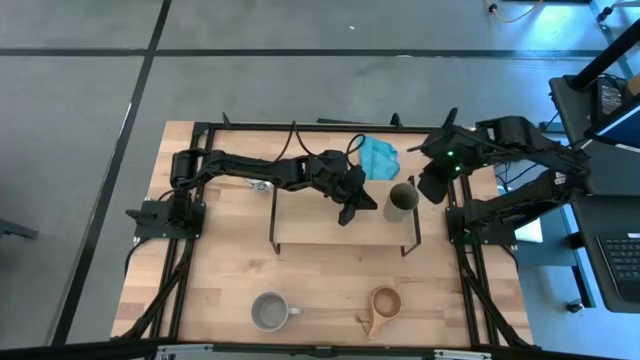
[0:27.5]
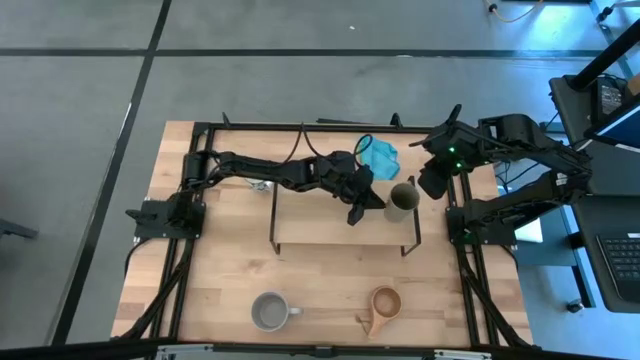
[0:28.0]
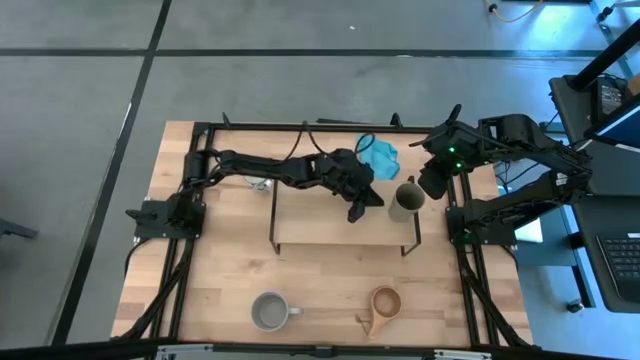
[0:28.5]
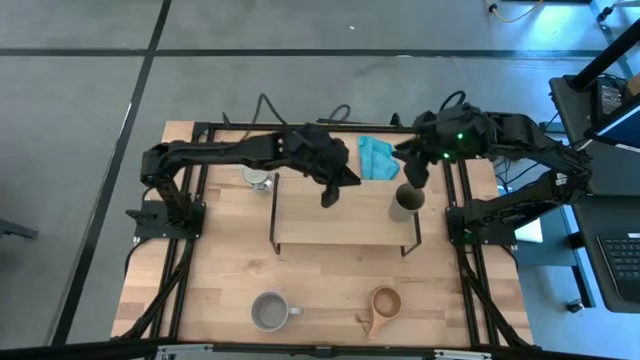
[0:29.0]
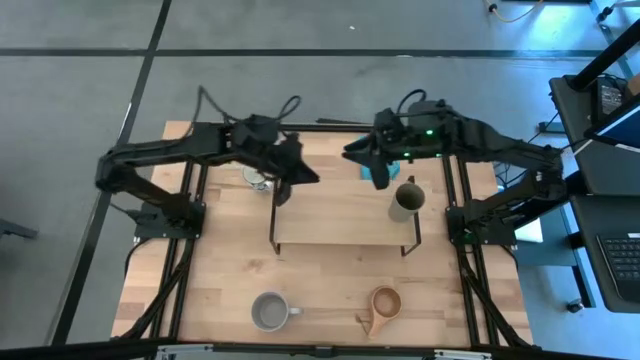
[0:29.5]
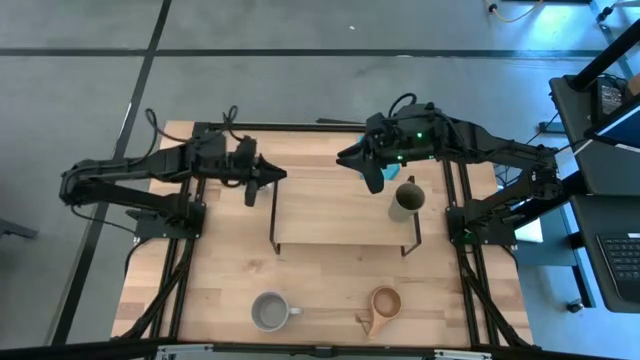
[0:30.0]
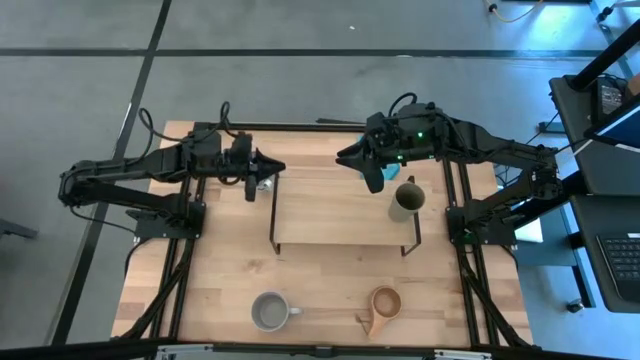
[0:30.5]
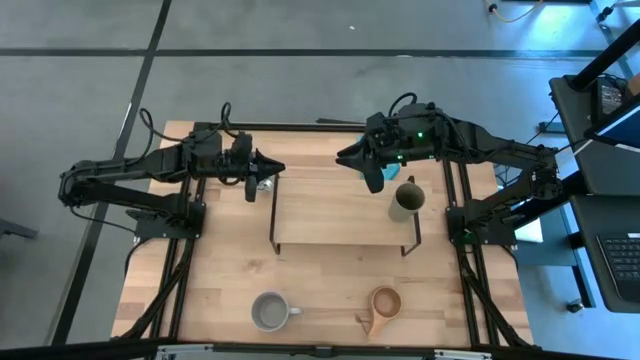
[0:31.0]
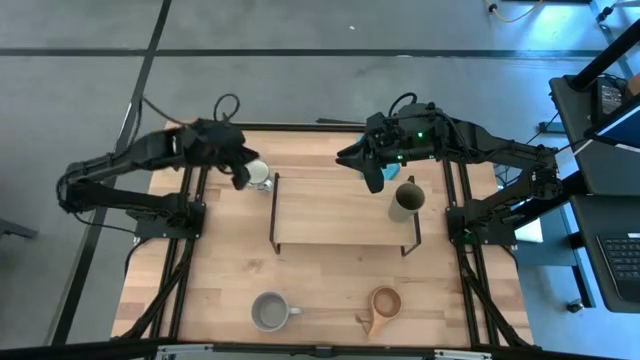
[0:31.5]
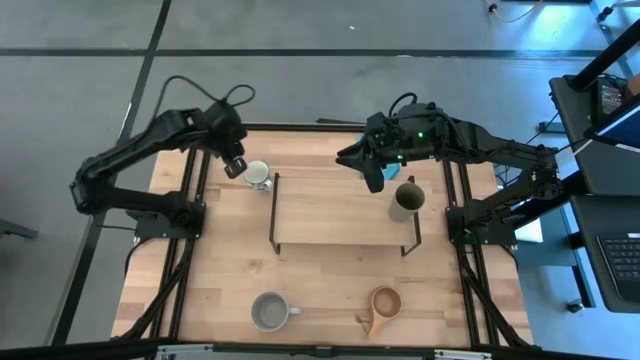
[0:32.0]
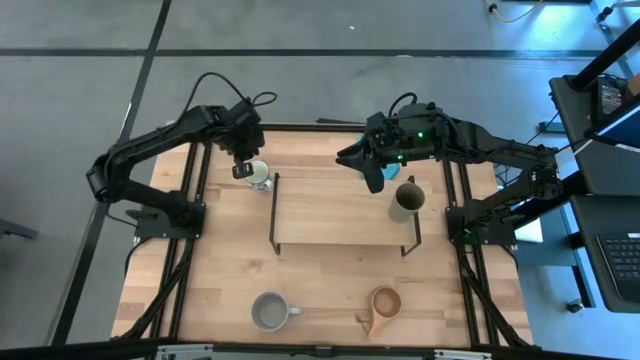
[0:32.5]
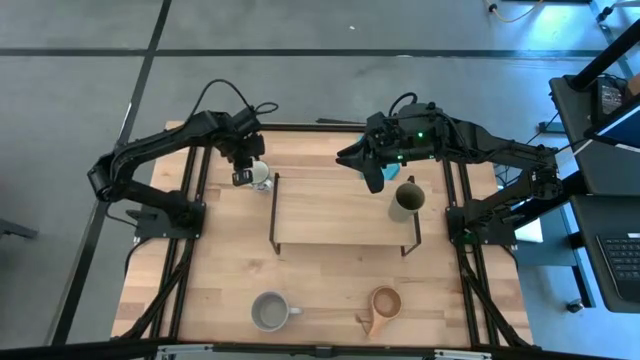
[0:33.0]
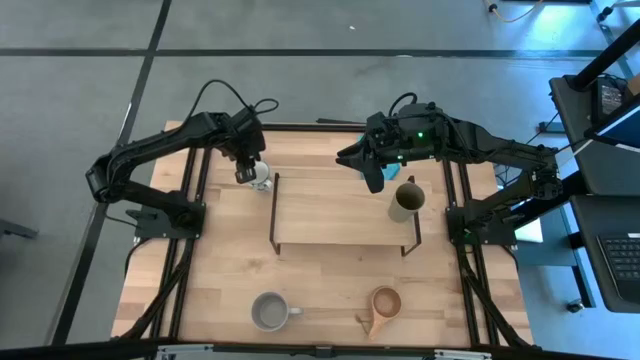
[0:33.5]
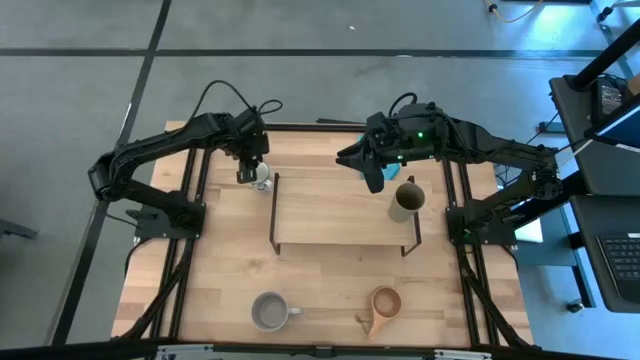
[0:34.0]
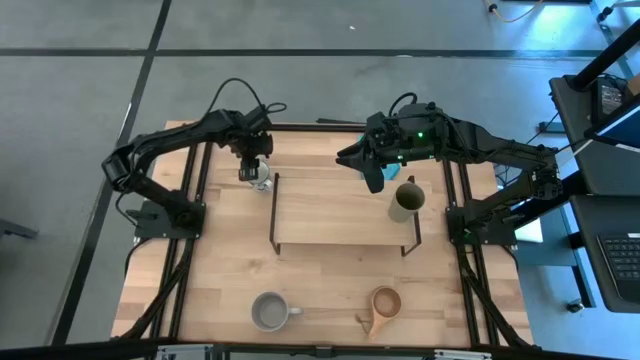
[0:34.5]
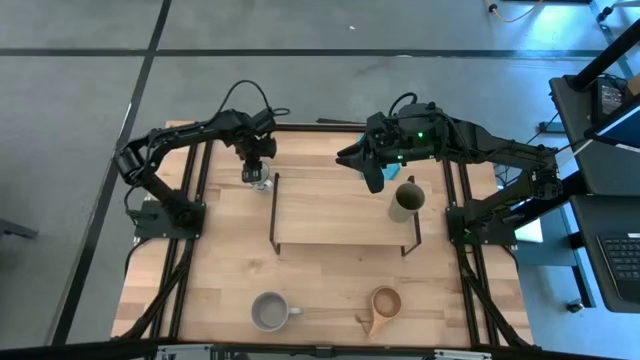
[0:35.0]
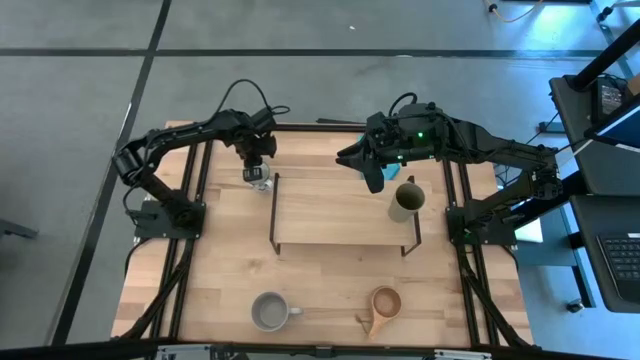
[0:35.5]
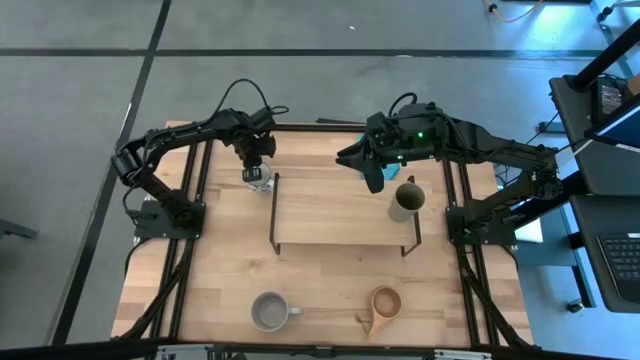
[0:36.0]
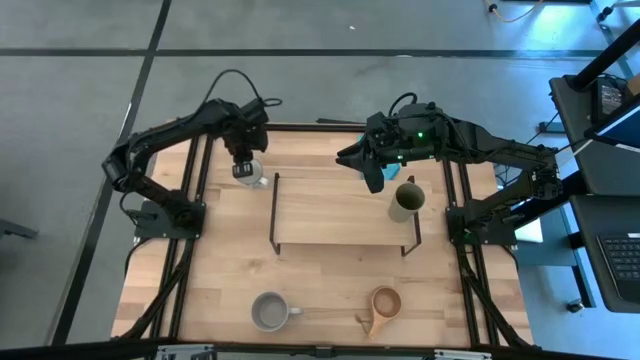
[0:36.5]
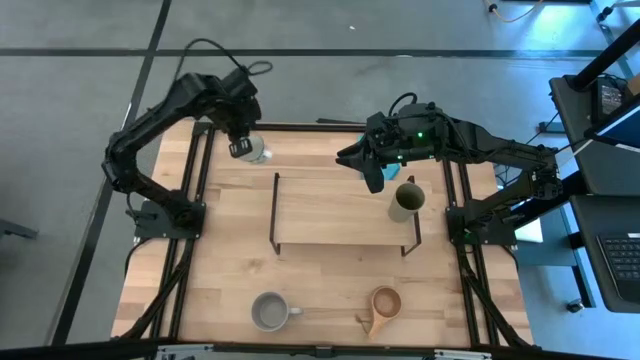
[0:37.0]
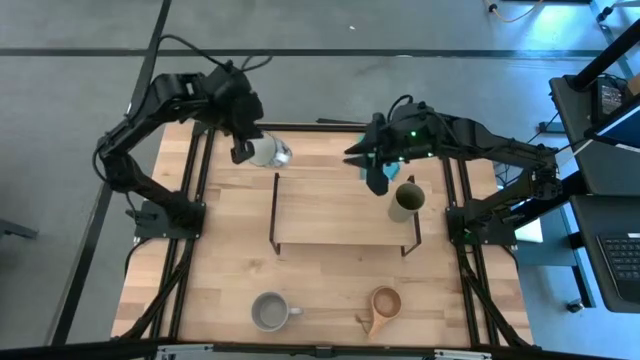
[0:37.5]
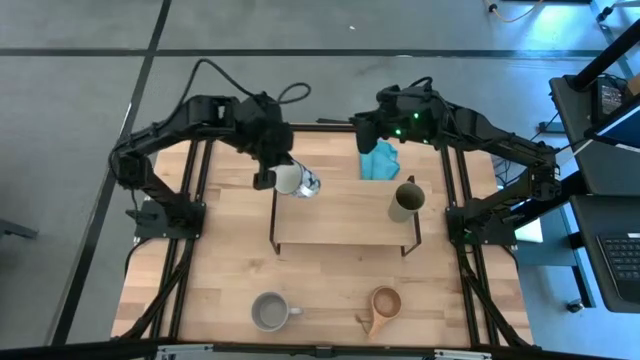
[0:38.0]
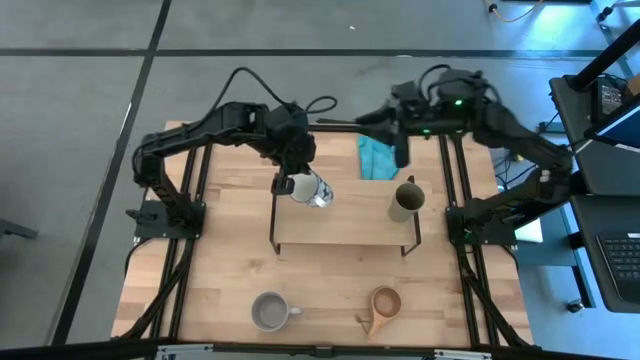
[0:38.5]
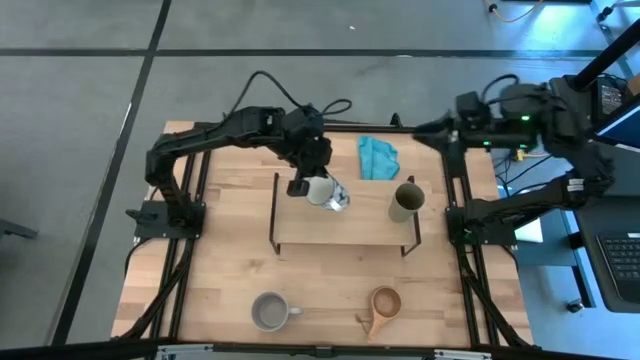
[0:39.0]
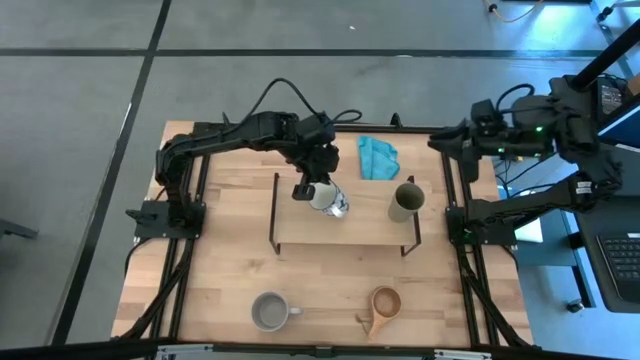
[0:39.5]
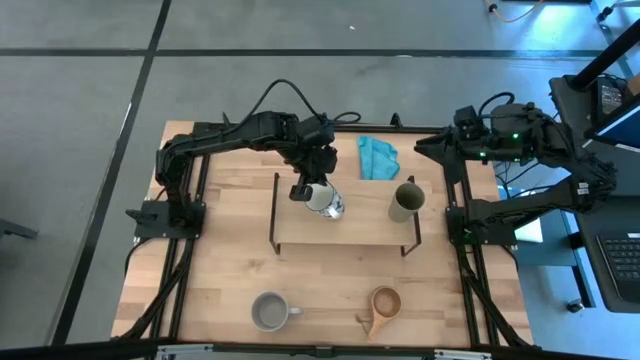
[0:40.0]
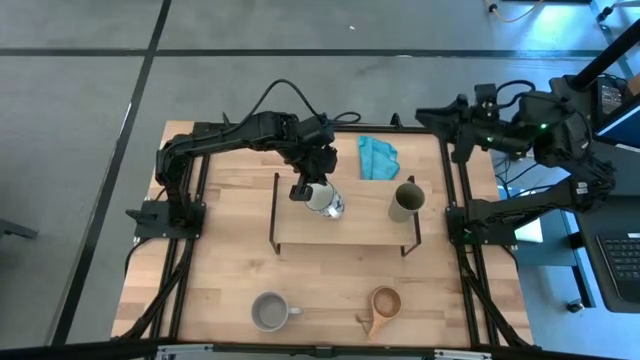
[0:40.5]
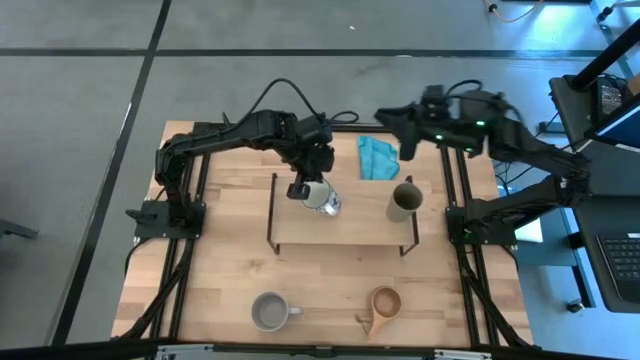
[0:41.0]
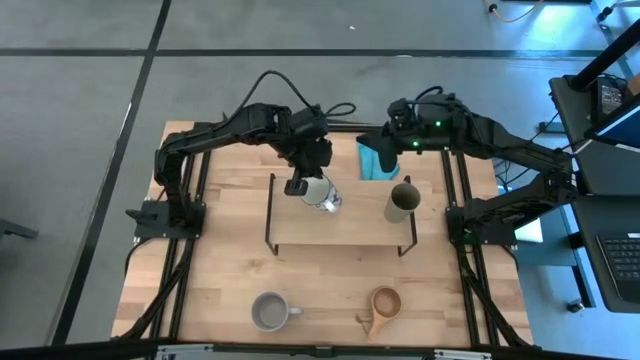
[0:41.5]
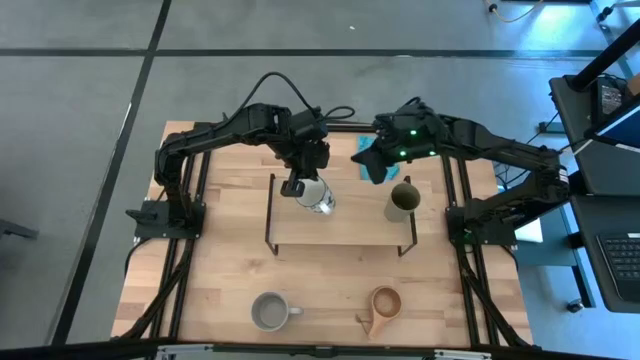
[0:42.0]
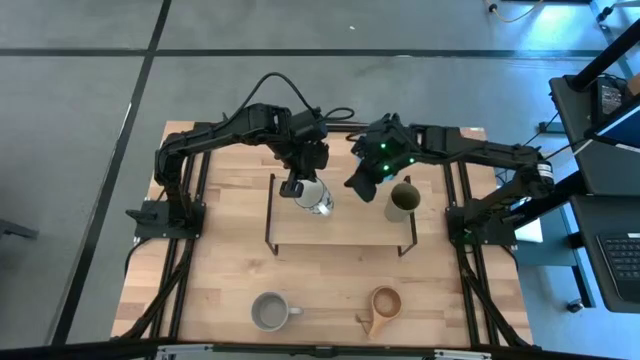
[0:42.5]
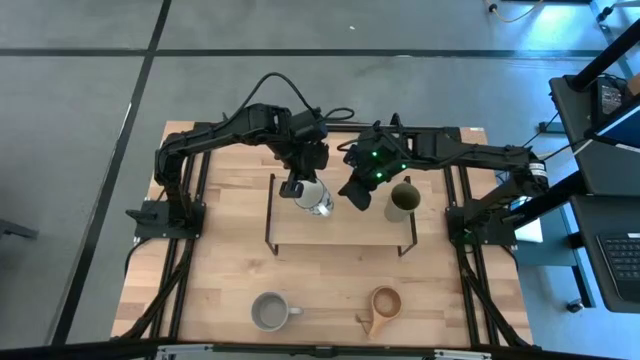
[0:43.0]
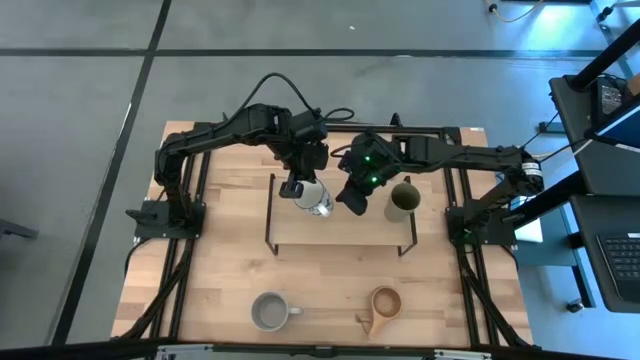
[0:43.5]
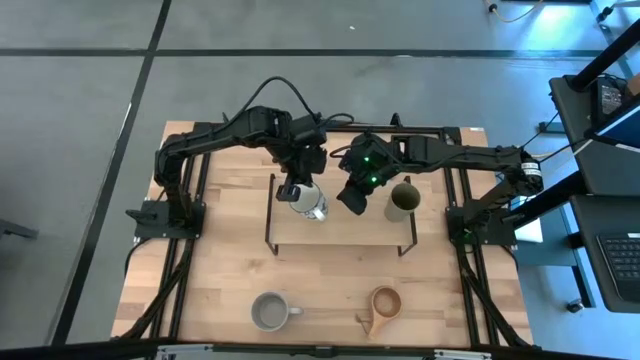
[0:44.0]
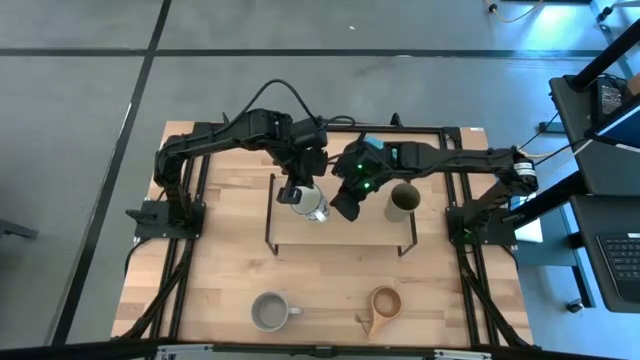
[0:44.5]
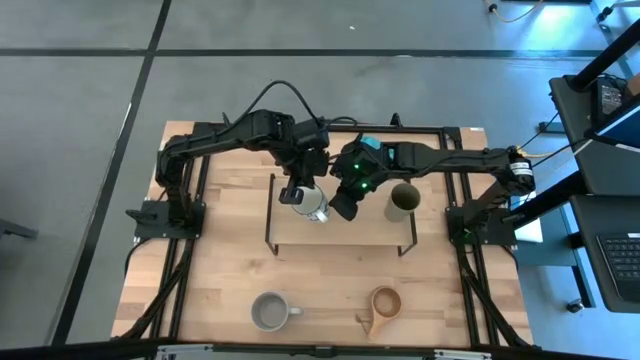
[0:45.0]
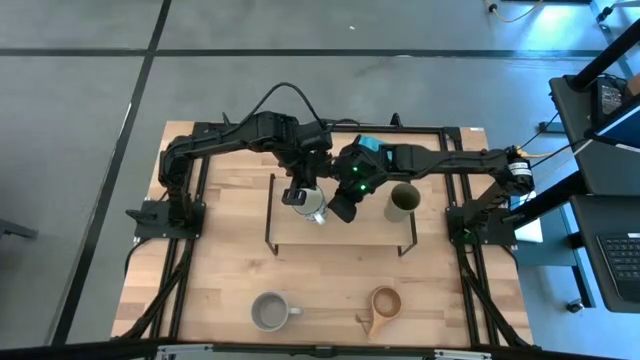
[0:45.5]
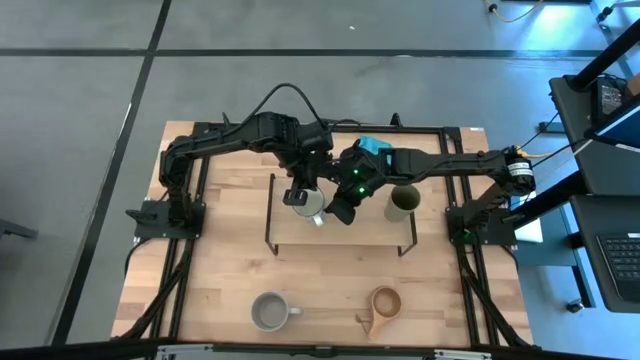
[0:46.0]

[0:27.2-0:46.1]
Task: Stack small to large cups/mugs on shelf
Put the blue patterned mug on the shelf

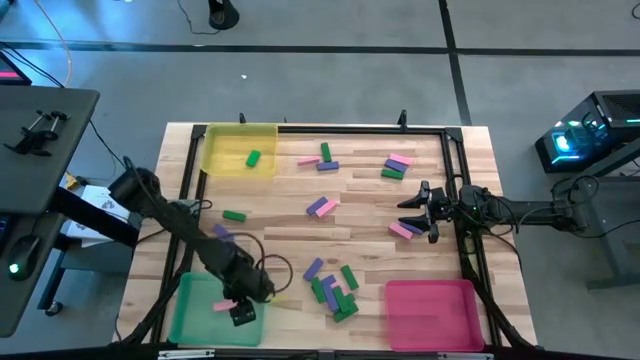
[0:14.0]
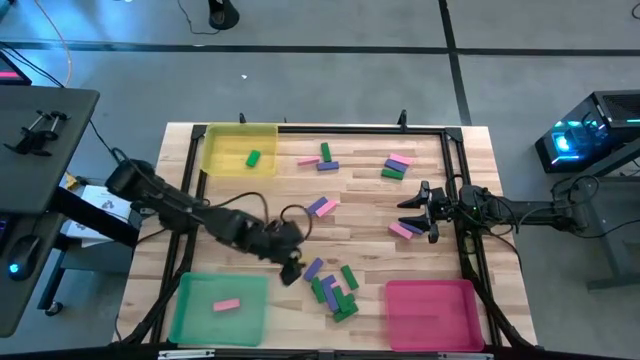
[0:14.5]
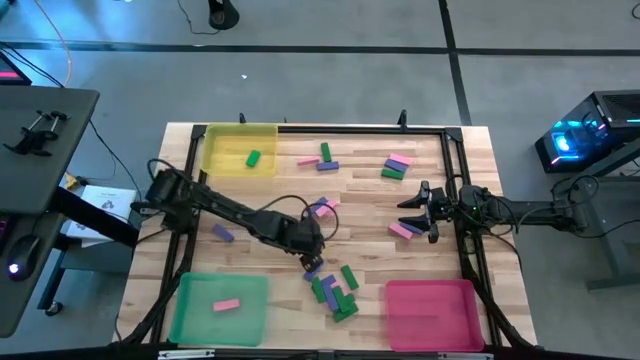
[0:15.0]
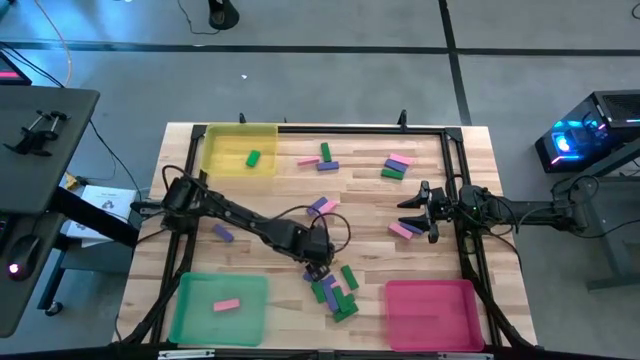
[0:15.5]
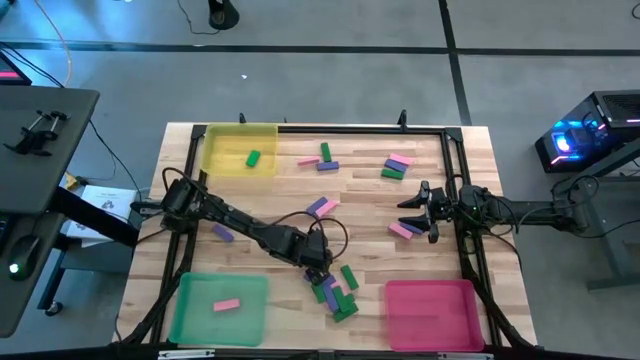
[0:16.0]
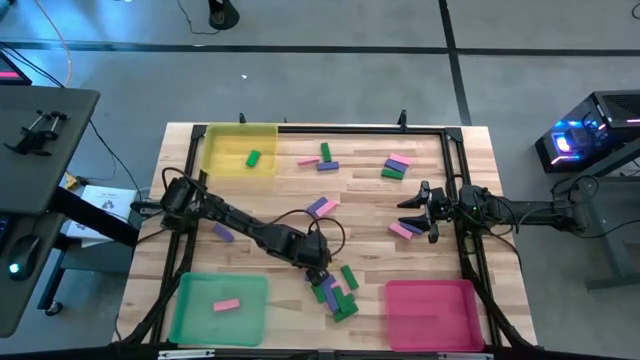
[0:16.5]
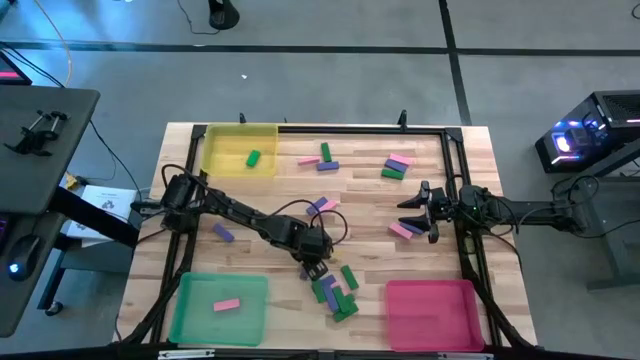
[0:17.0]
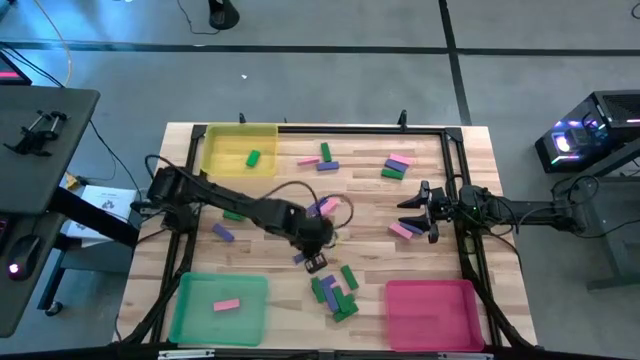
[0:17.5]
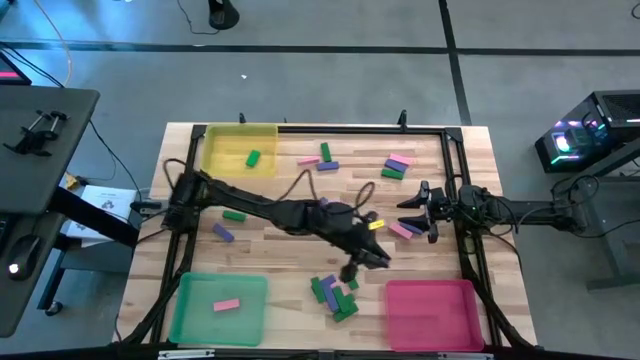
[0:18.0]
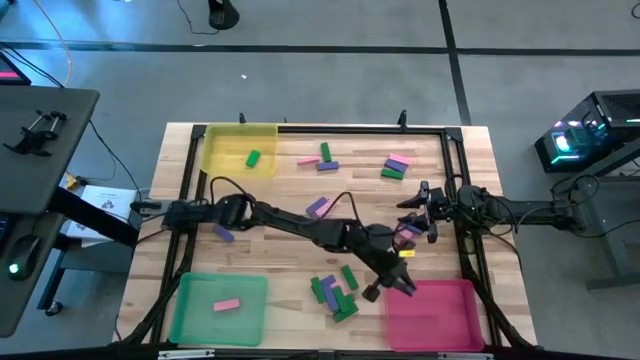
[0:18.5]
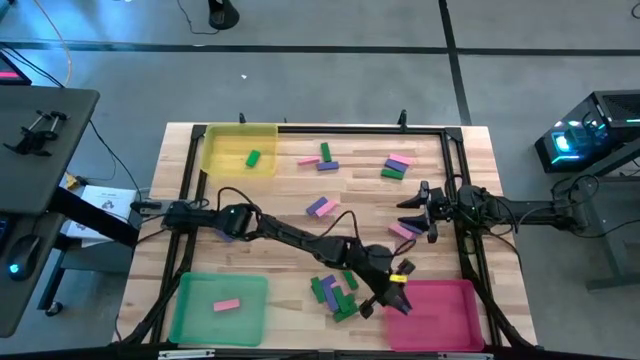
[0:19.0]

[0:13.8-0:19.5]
Task: Sort blocks
Put the violet block into the pink bin
